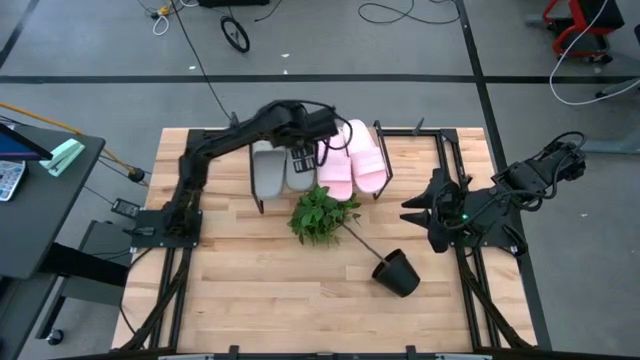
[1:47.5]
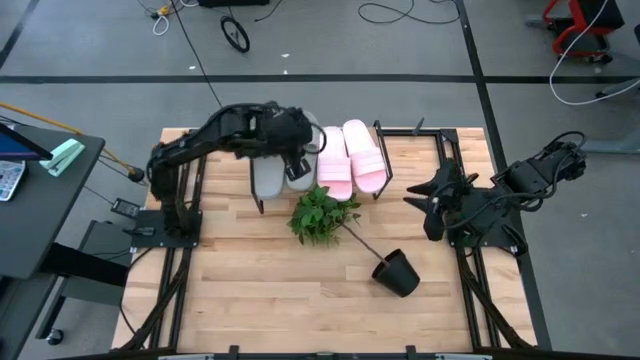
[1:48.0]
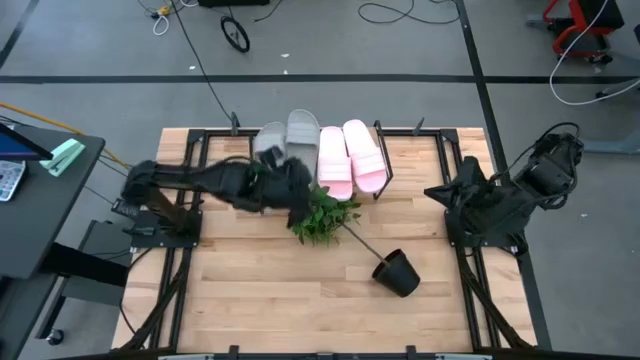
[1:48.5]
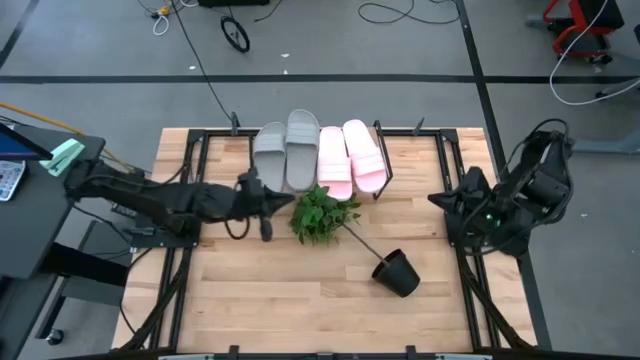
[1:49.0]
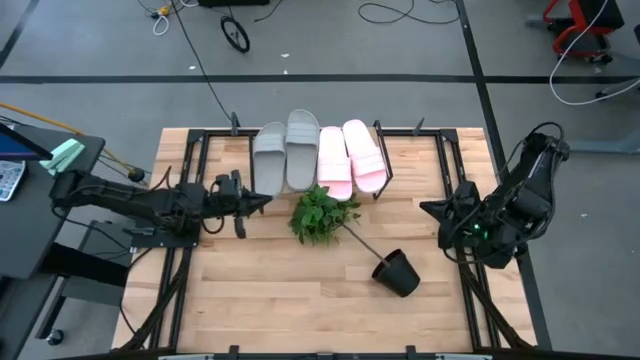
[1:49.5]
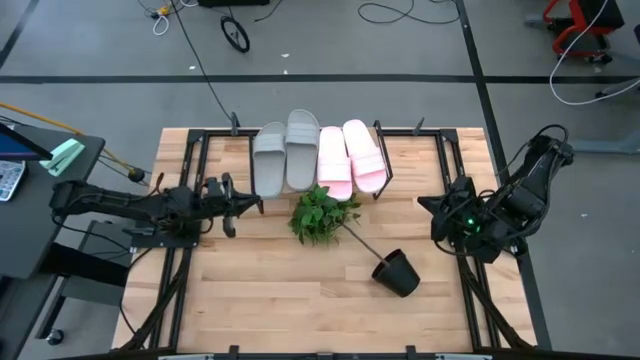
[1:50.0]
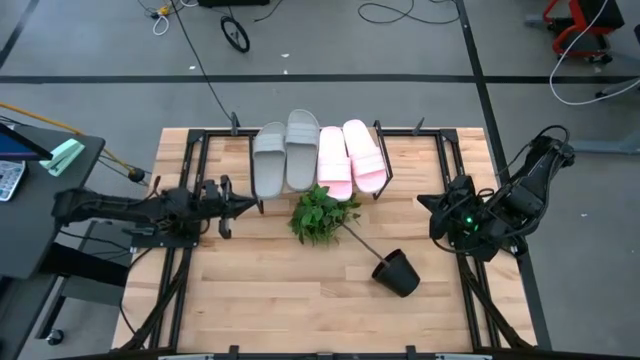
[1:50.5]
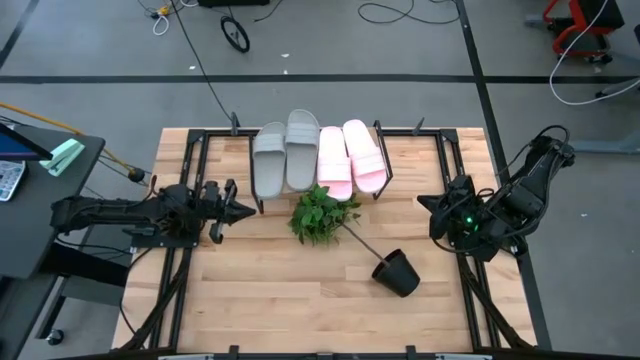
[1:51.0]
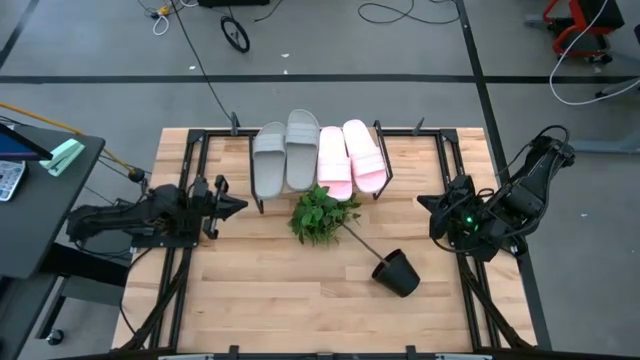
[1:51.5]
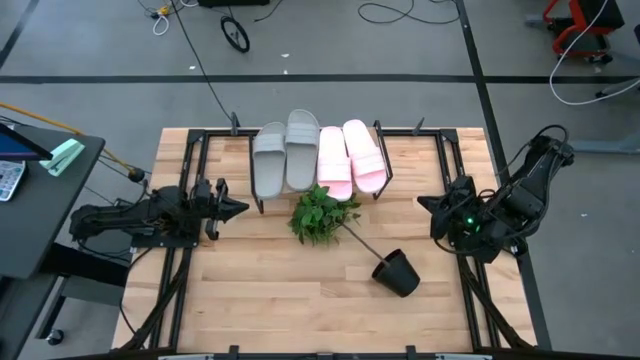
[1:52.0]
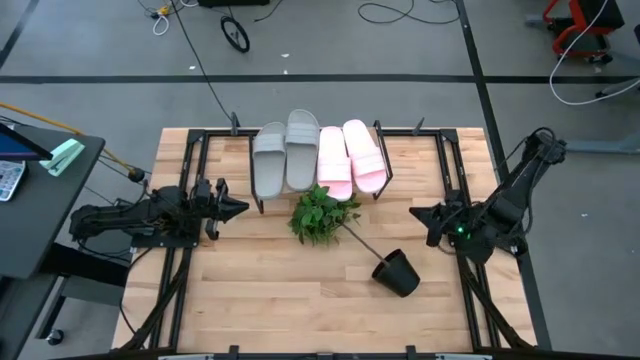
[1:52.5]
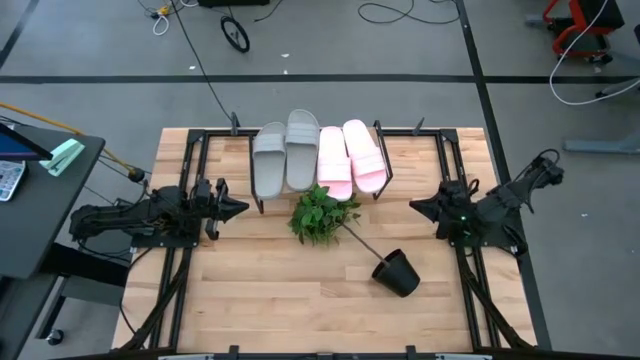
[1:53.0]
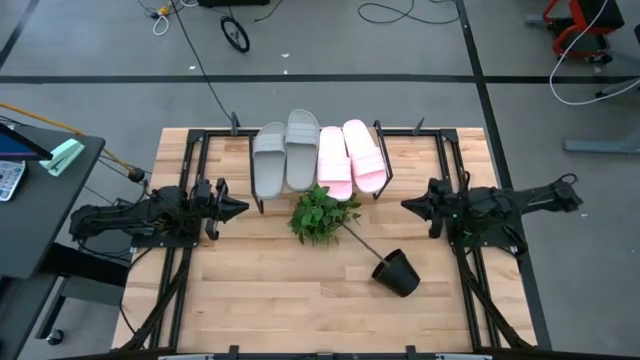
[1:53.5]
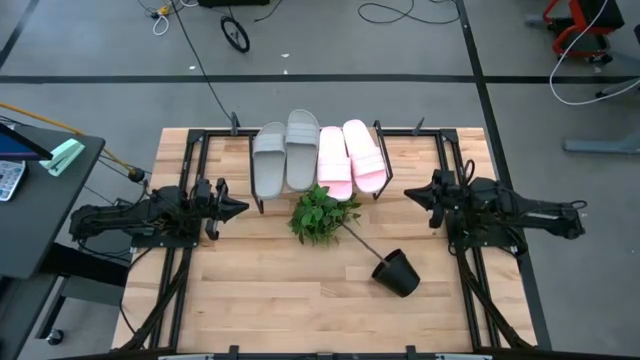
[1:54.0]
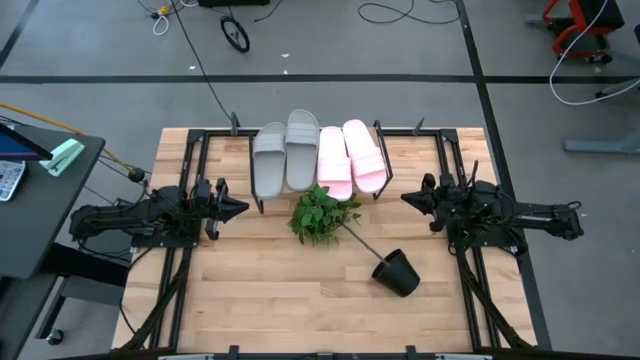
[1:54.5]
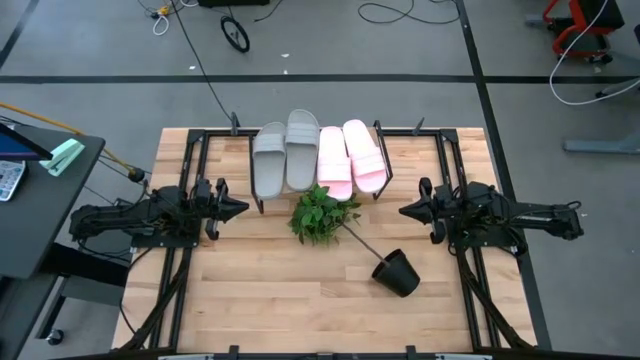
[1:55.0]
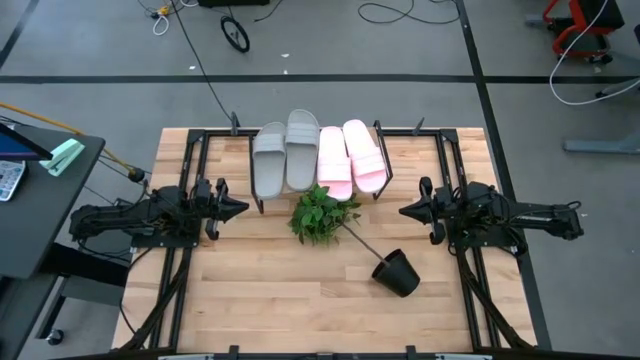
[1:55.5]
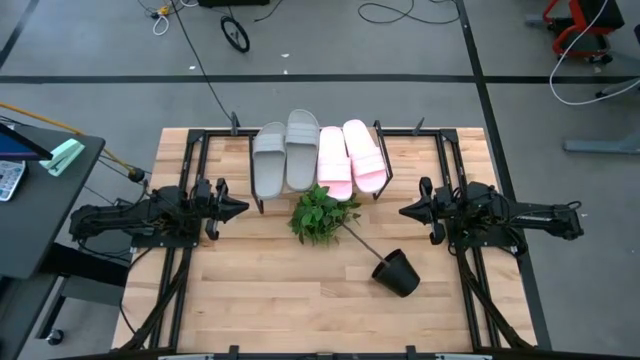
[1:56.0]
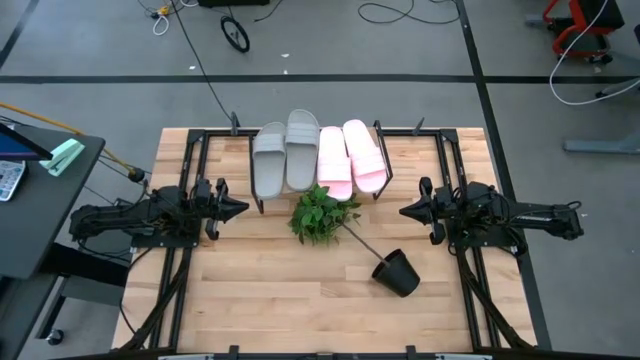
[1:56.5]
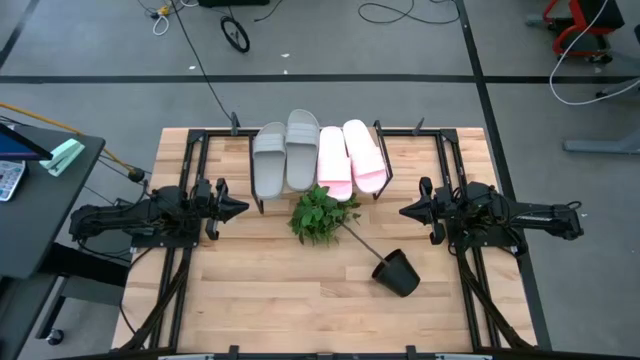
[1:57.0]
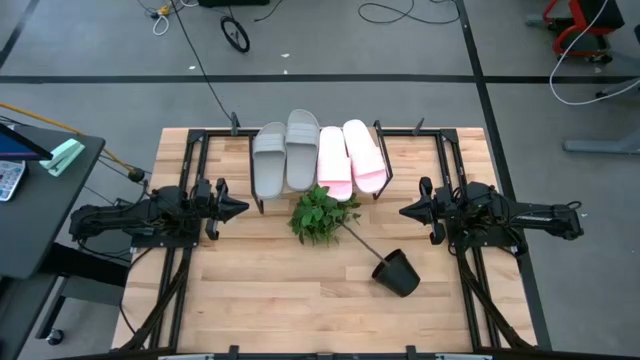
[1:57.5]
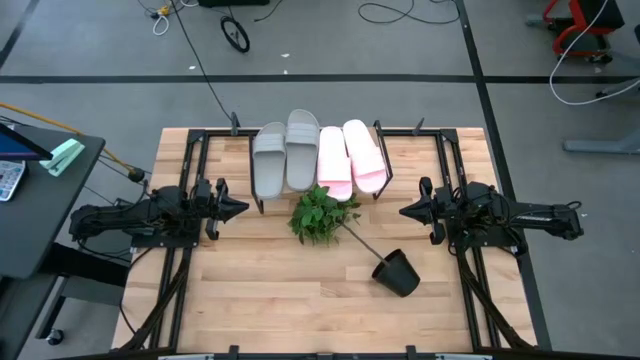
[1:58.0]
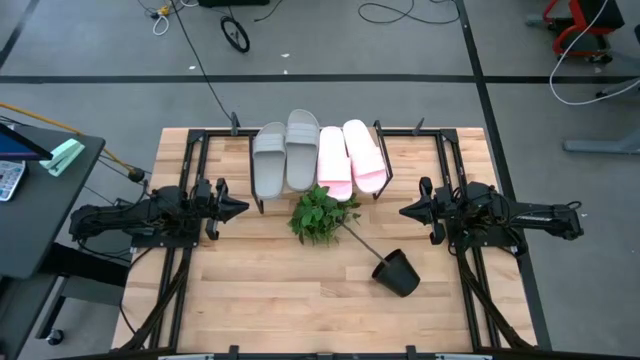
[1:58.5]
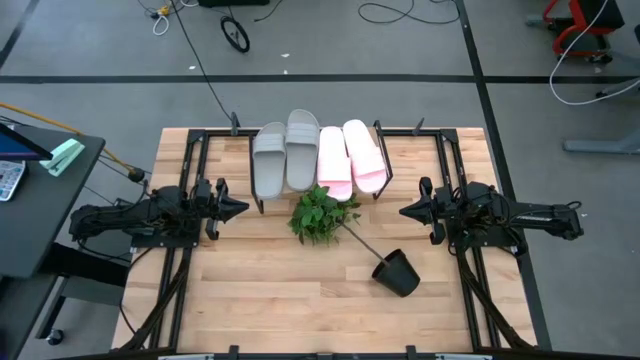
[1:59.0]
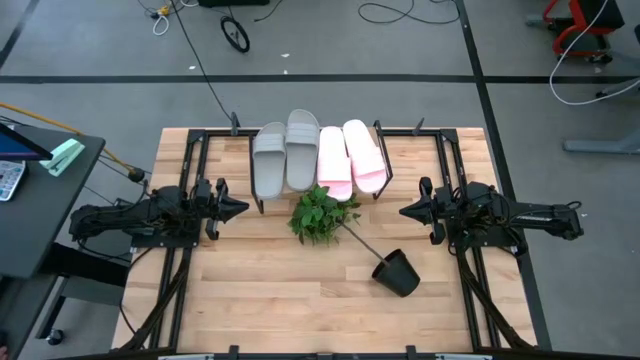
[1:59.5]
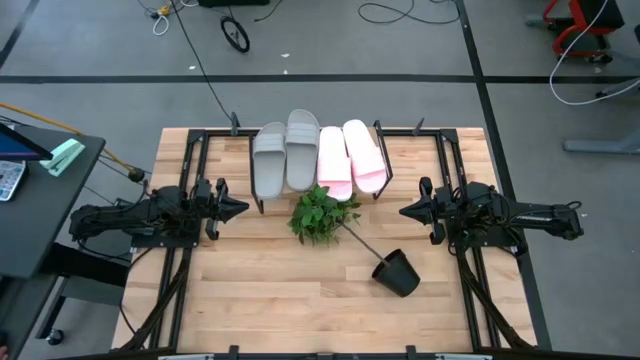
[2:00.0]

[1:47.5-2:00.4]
Task: Pick and place slides into the shelf
Return to Home Position

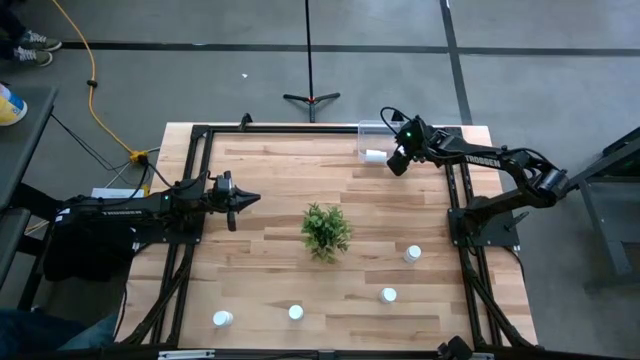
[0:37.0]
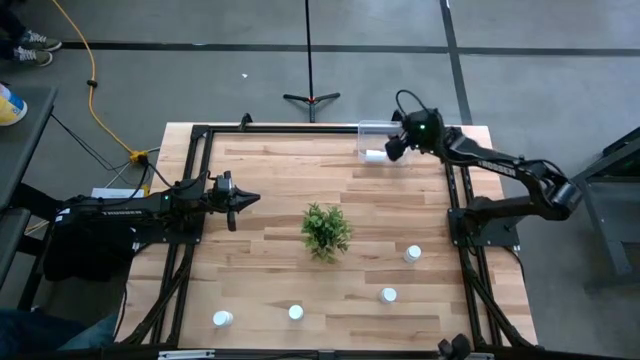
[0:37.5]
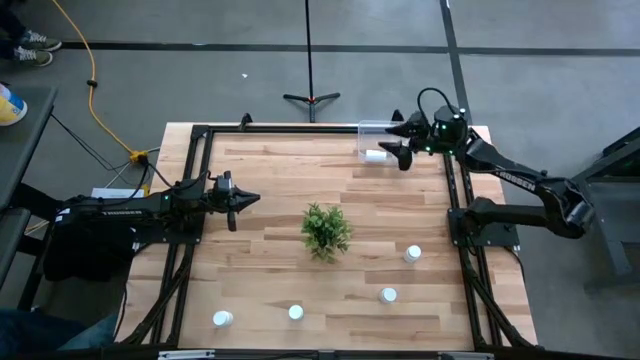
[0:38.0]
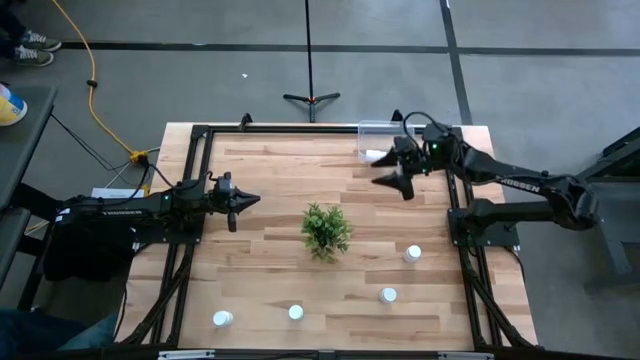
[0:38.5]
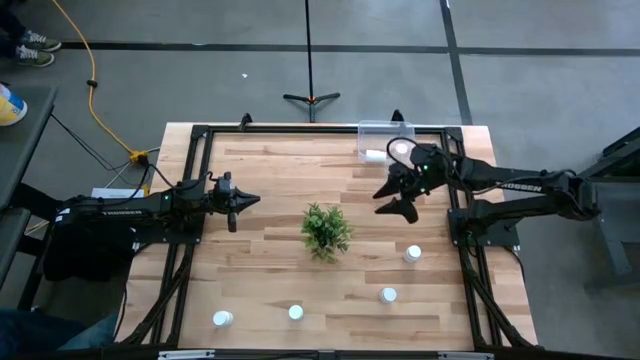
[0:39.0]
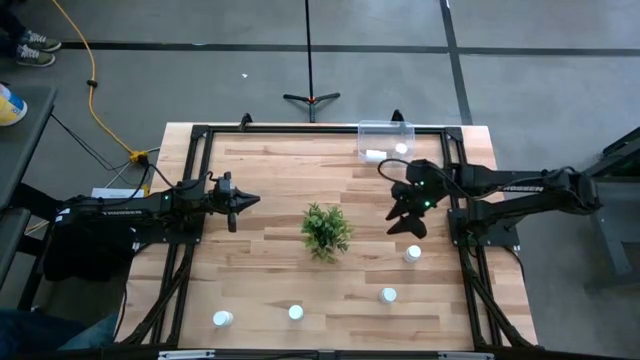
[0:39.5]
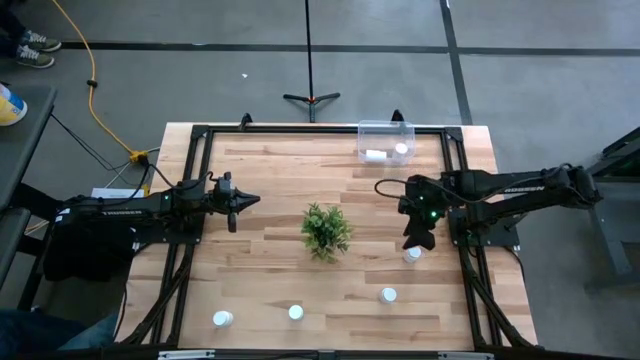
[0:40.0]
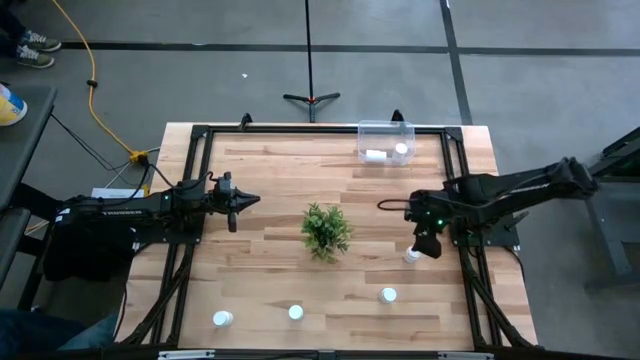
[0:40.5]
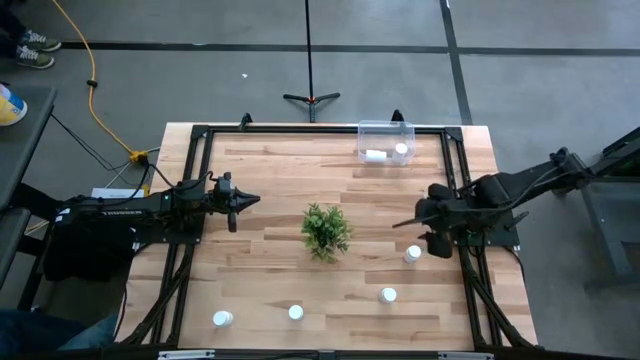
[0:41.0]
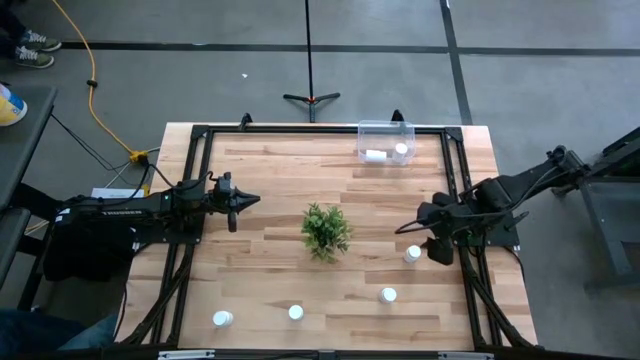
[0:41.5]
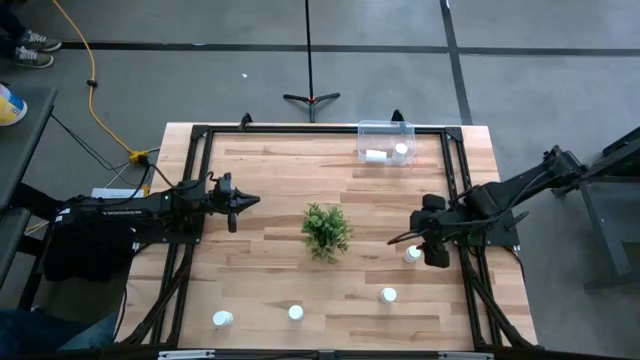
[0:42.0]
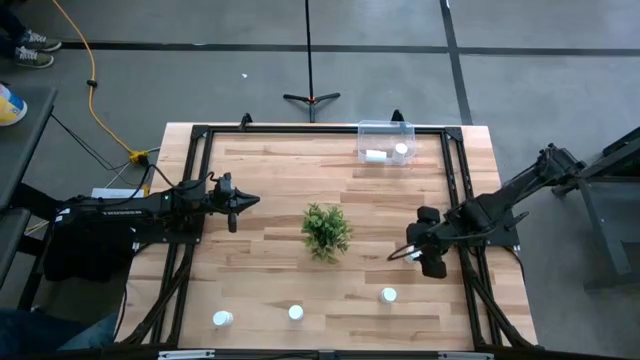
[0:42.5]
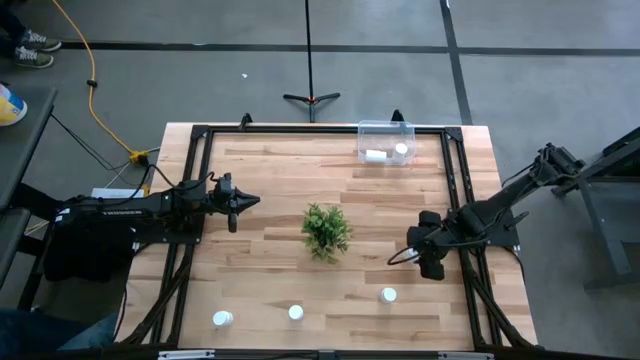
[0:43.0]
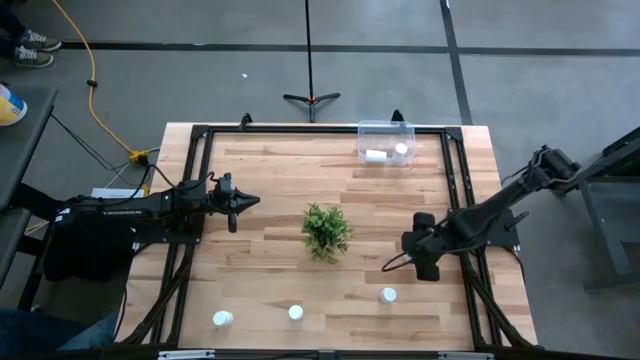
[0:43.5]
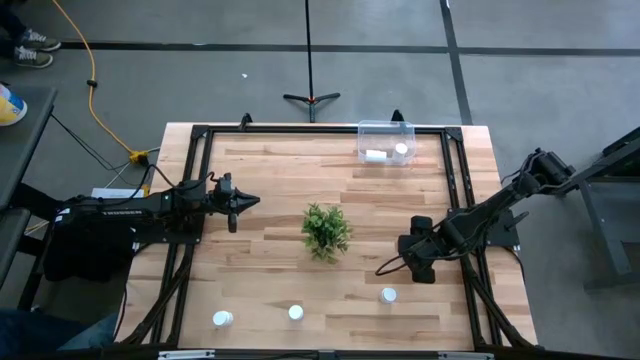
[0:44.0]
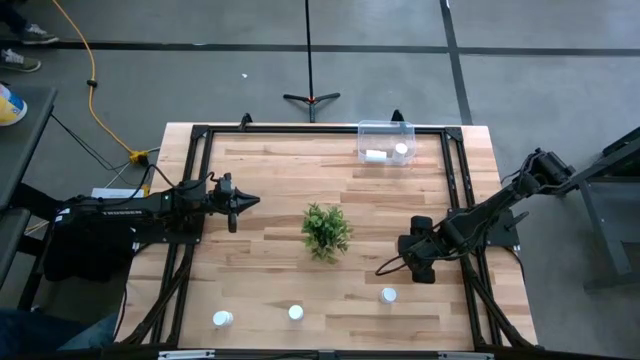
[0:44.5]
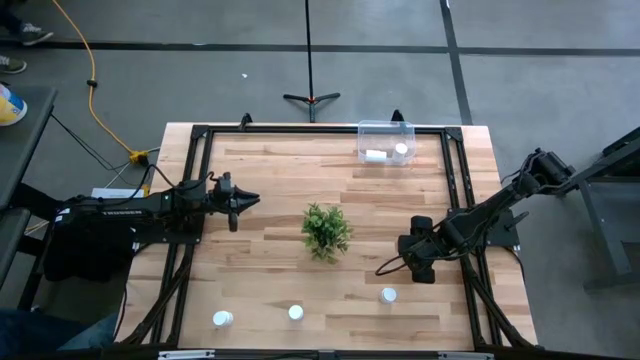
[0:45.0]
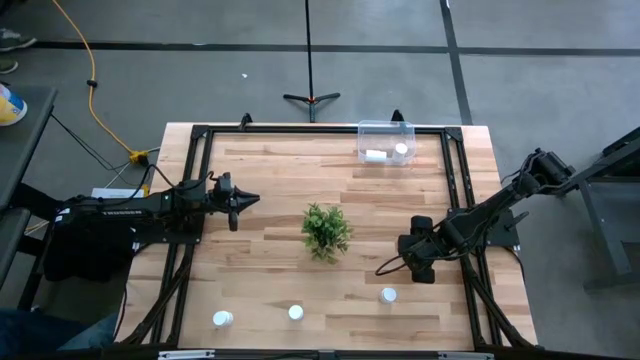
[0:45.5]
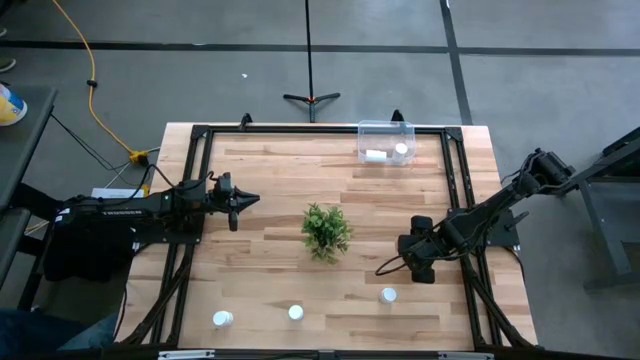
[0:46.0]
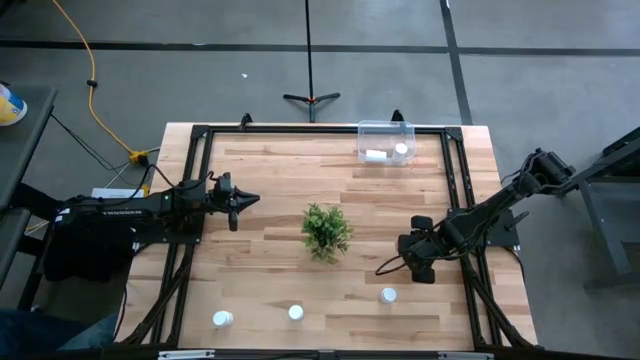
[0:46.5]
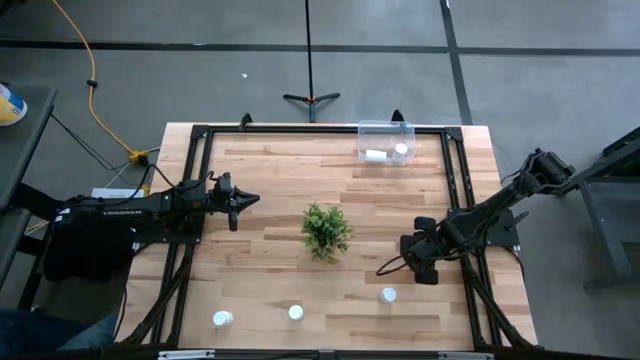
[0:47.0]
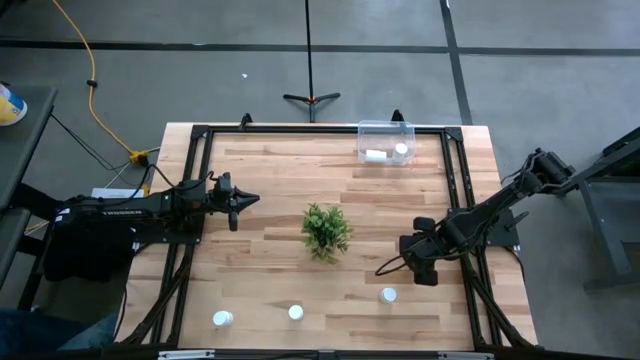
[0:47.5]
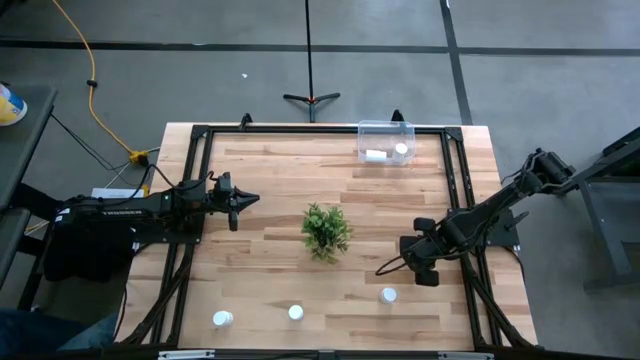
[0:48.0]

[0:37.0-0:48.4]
Task: Pick and place pill bottles into a basket
Put the white pill bottle into the transparent bin
